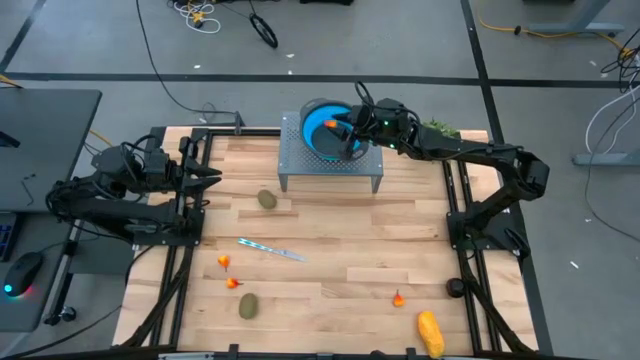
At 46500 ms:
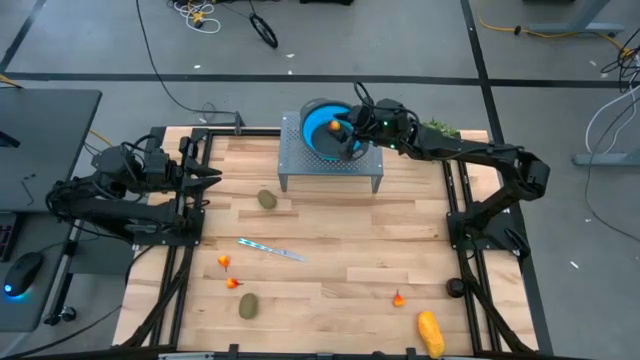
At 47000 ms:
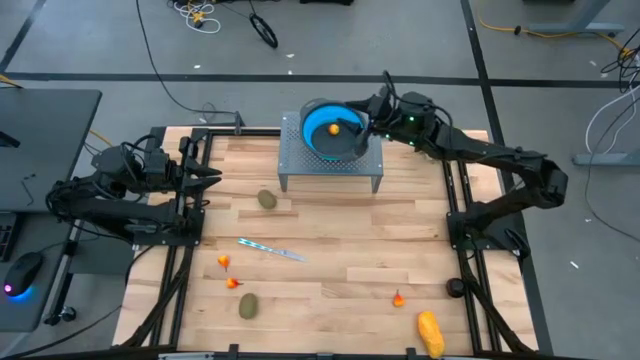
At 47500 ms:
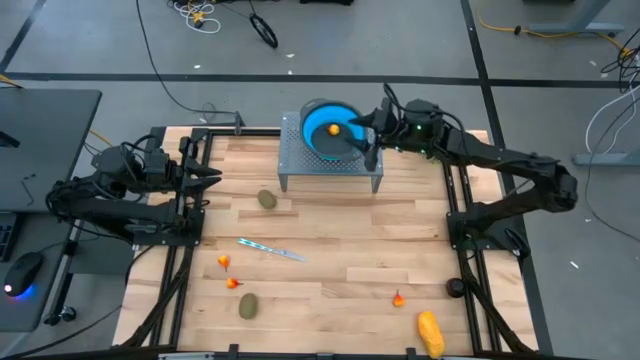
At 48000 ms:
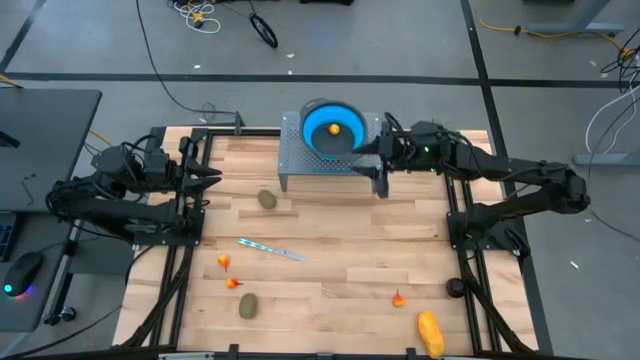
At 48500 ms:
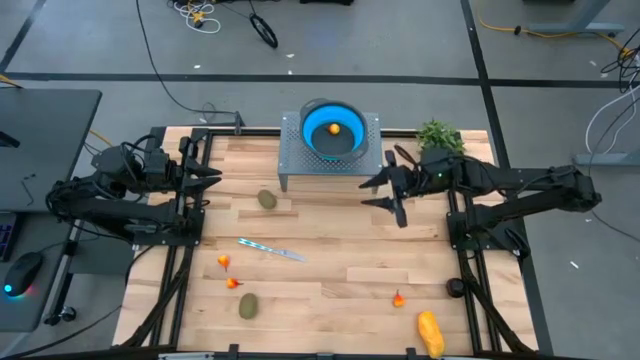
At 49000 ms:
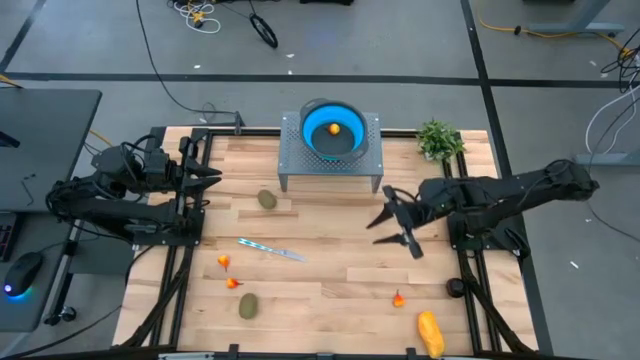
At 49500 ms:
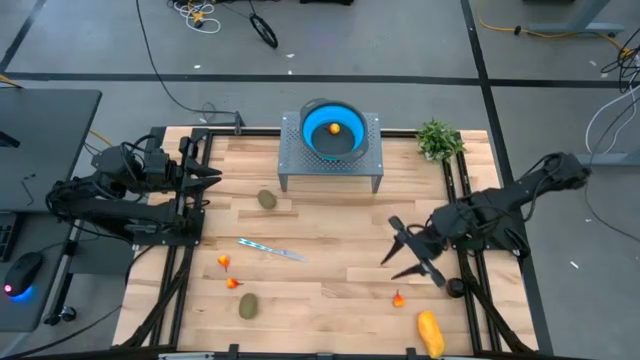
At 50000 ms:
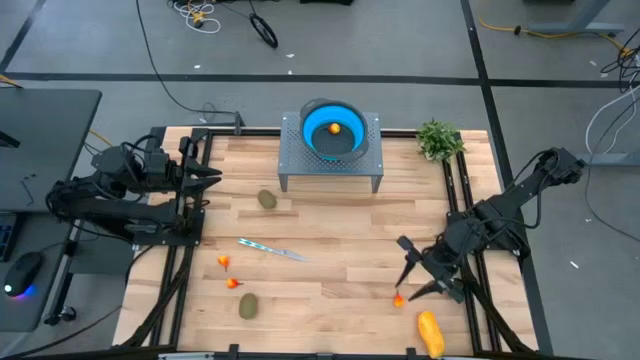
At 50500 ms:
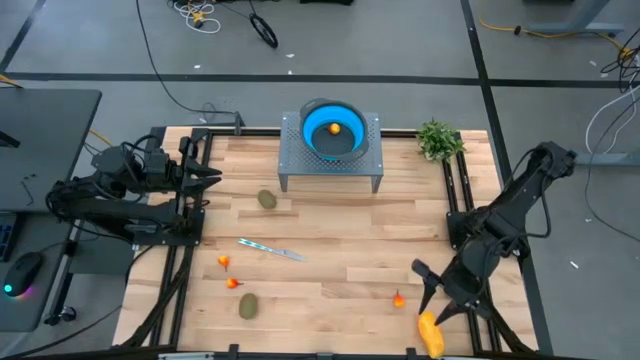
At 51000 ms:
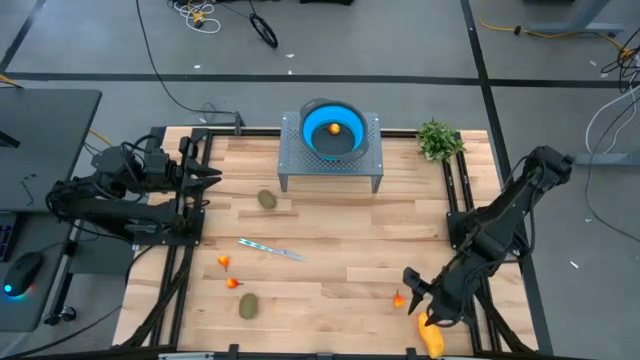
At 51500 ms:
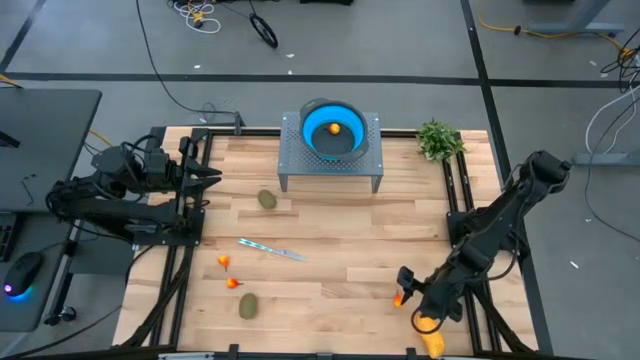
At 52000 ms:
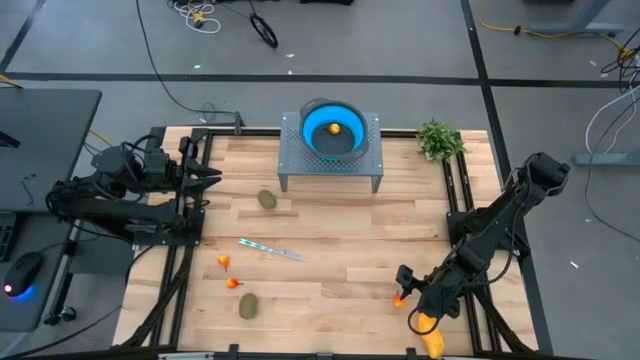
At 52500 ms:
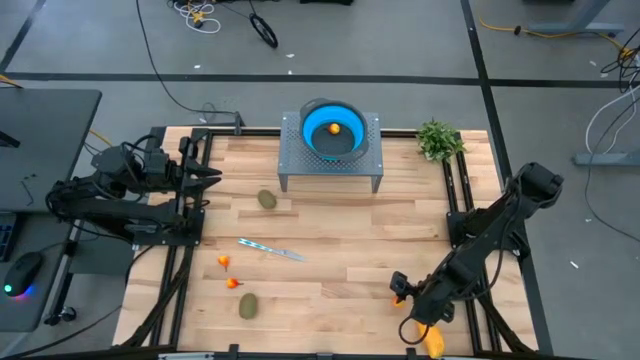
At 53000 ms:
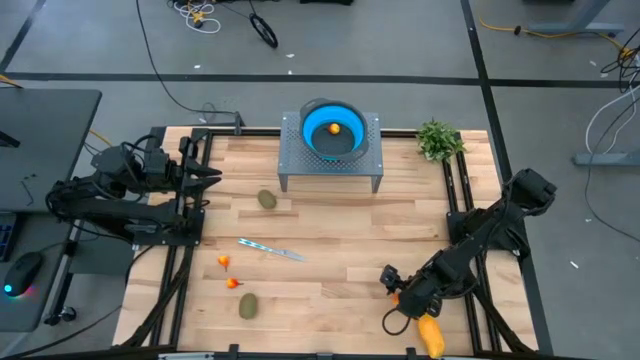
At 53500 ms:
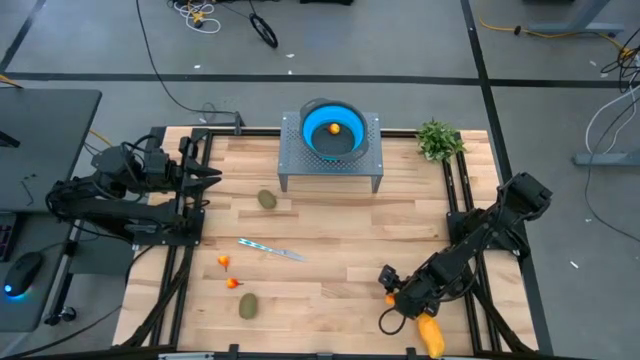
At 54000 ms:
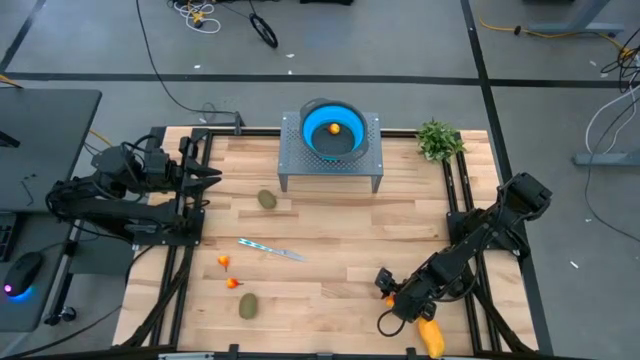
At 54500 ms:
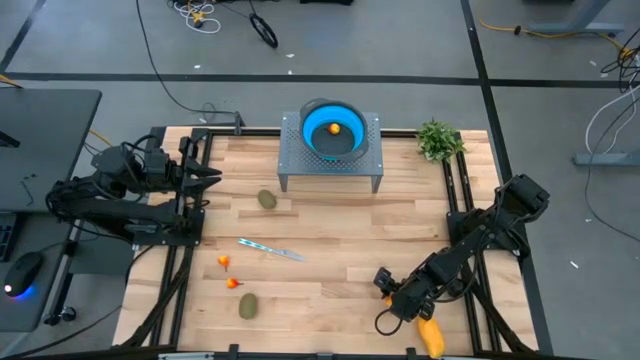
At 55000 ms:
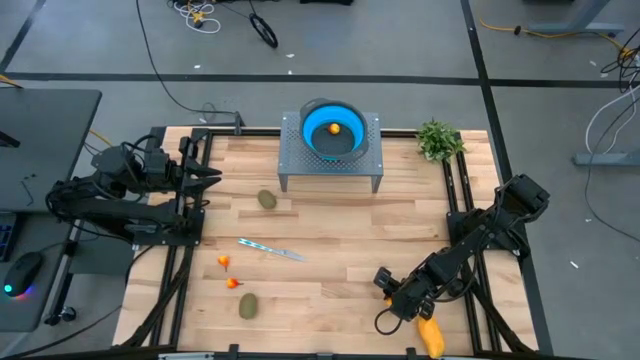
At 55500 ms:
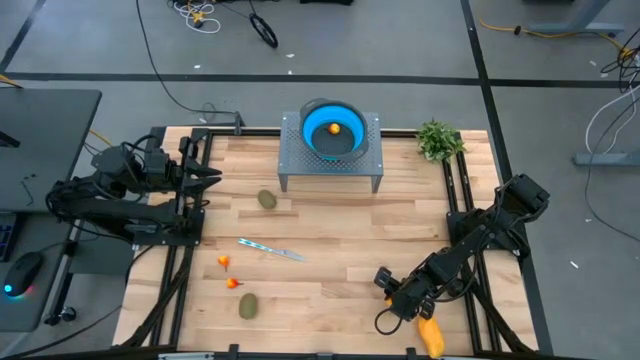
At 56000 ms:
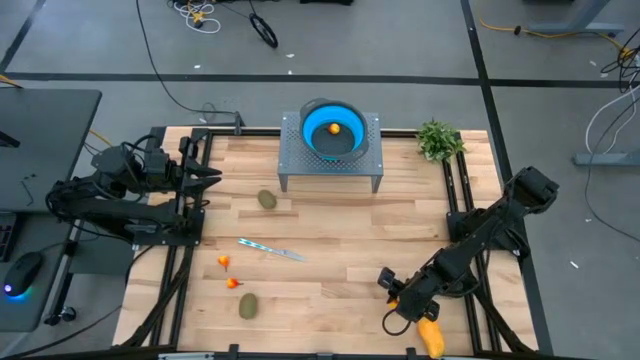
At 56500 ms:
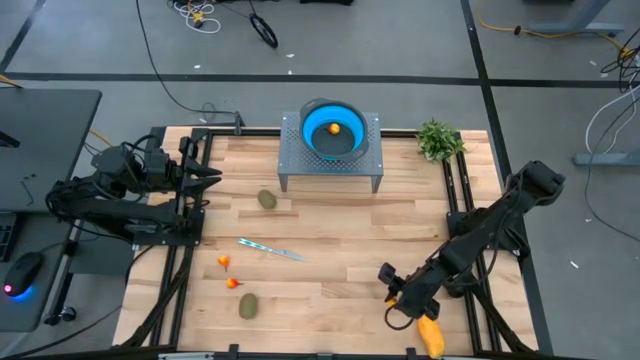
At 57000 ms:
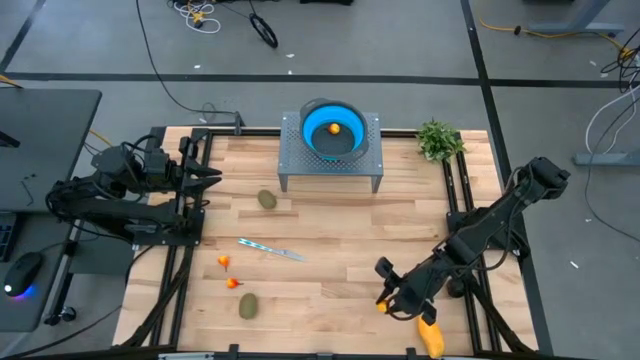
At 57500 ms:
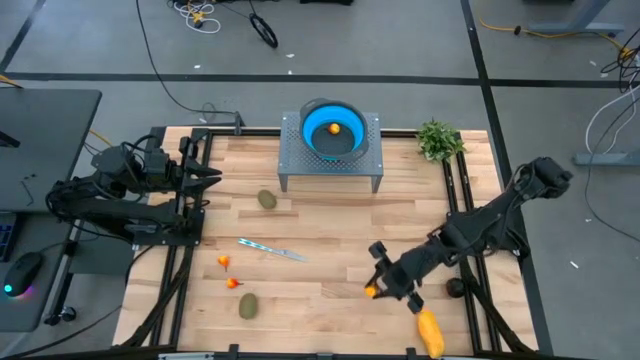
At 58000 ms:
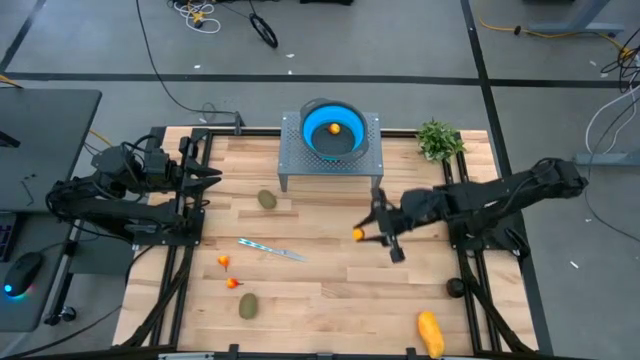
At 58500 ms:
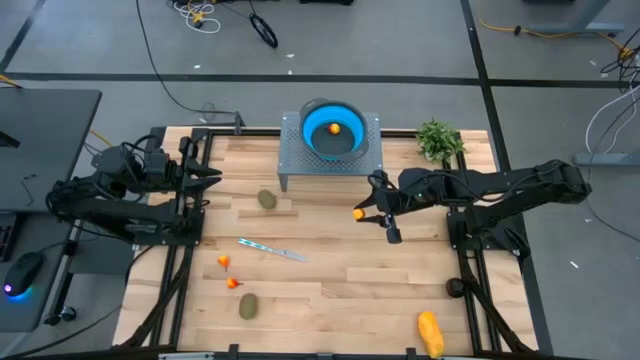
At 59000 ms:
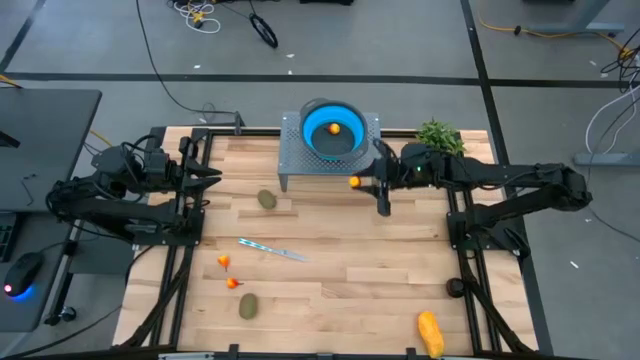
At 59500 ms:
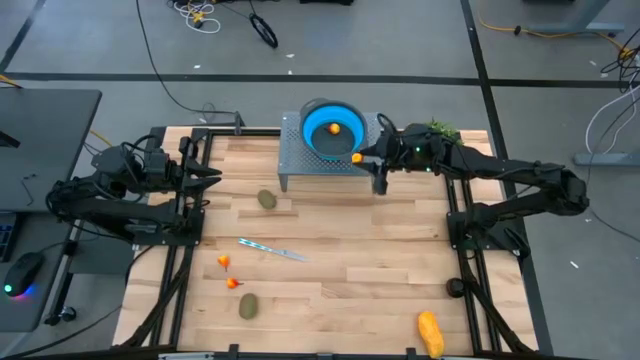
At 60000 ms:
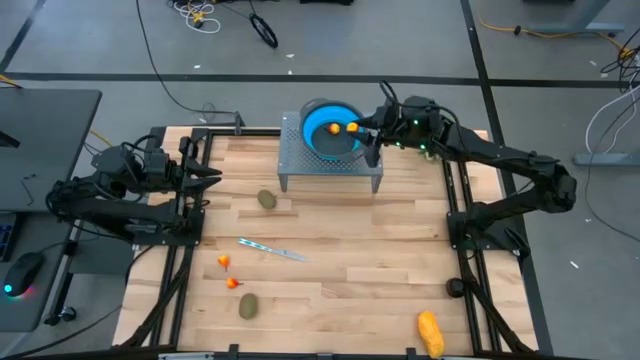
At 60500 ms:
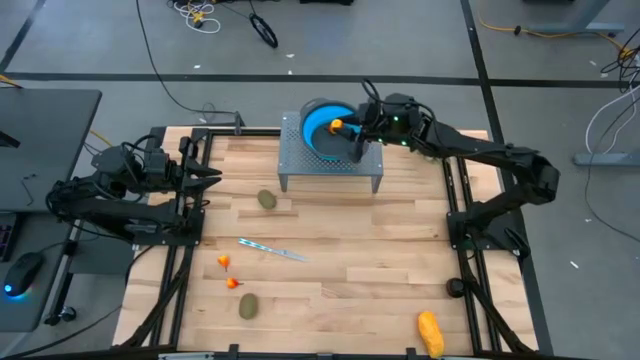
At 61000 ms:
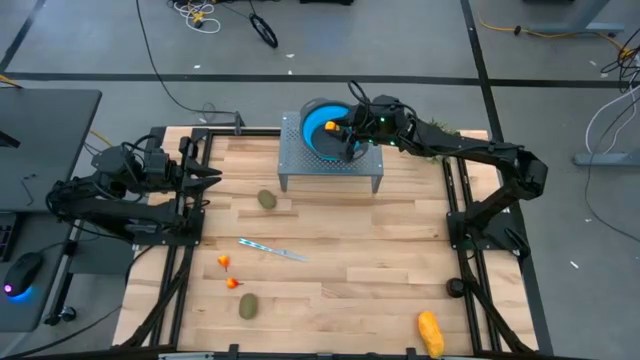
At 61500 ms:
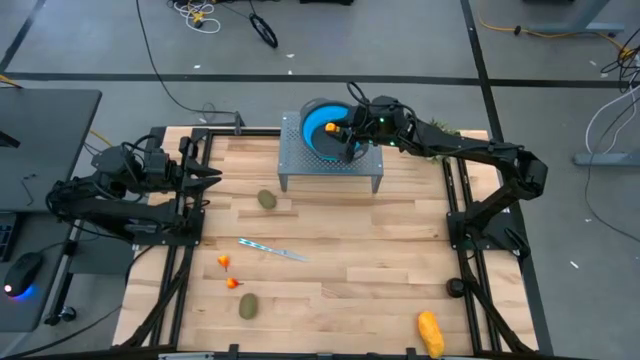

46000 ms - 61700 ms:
Task: Pick & Place Fruit
Put the peach into the blue bin
